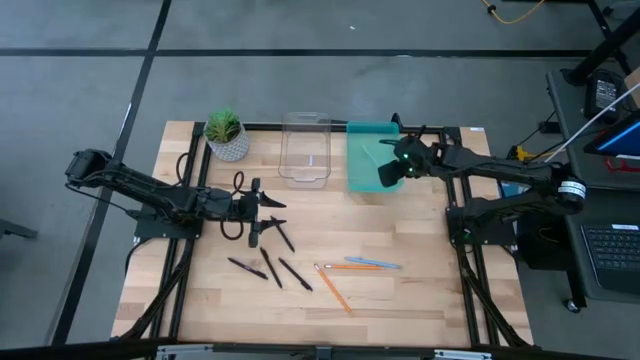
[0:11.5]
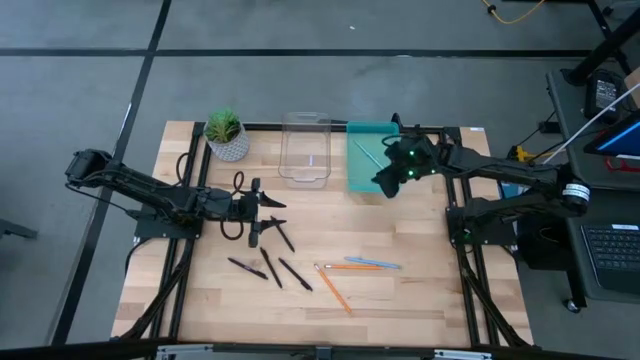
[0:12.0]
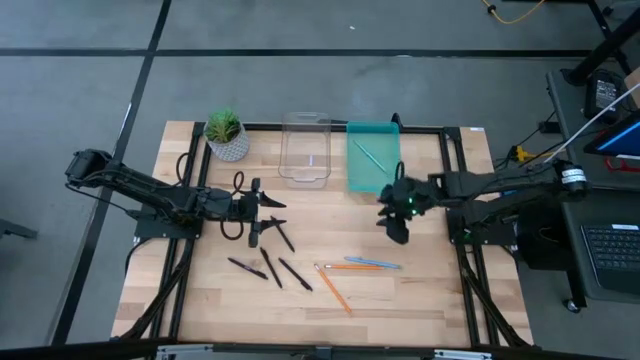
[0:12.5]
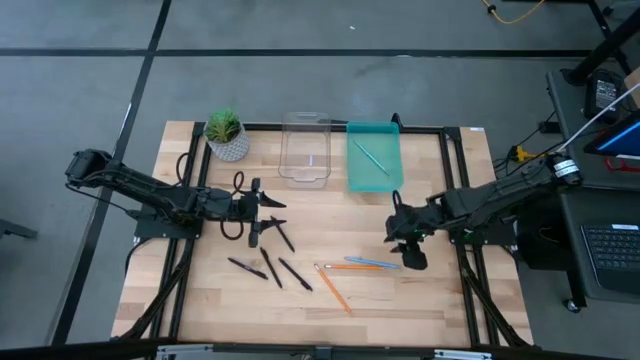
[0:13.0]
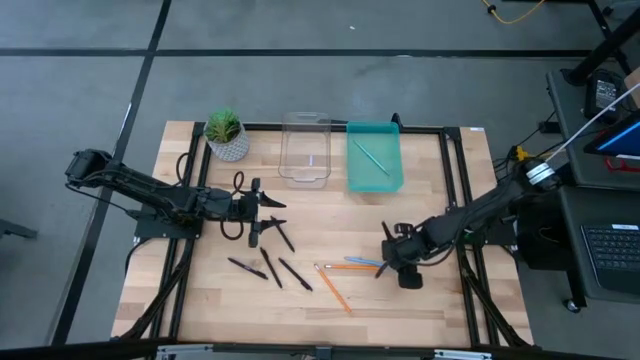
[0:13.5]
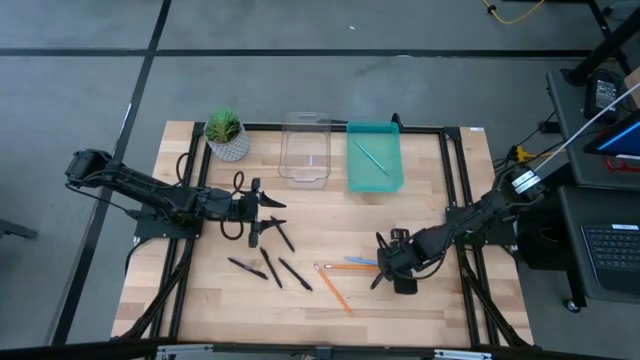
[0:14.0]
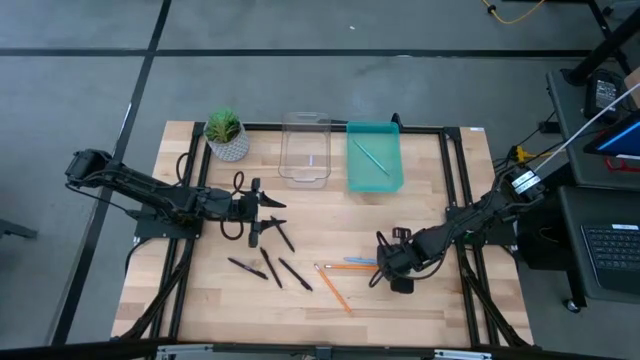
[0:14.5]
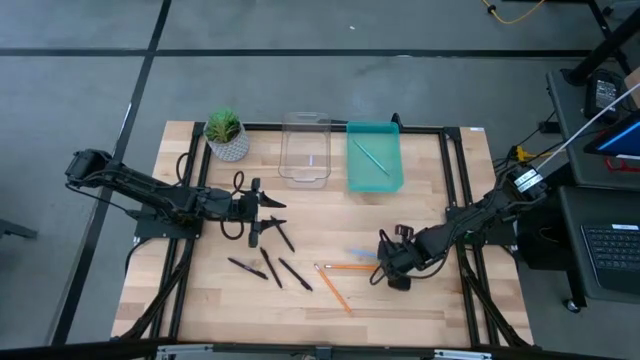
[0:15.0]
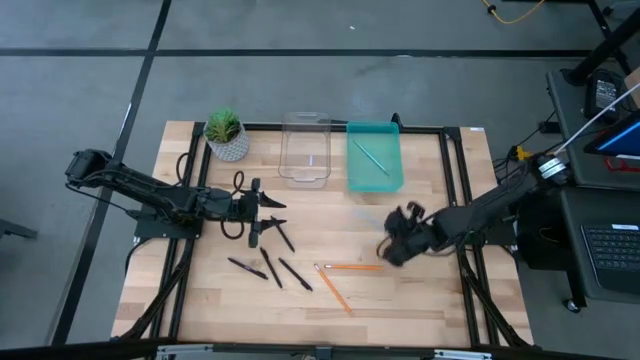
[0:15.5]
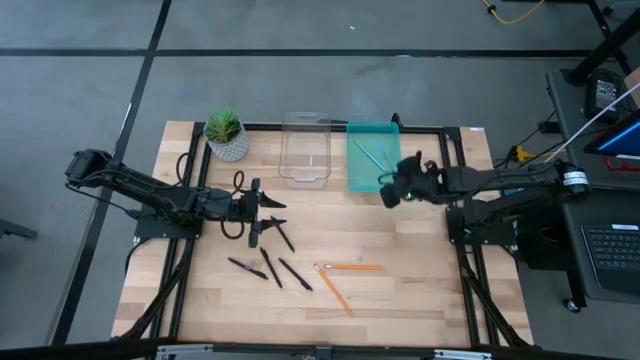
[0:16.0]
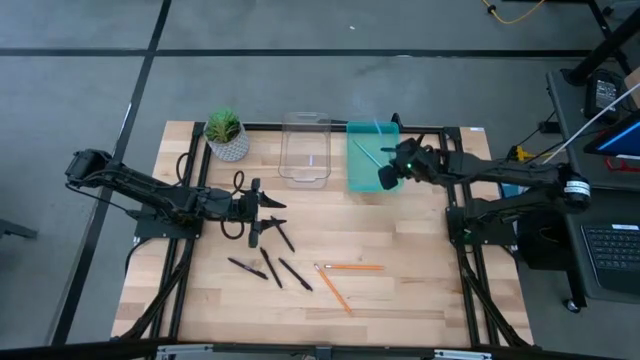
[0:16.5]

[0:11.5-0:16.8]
Task: Sort pens & pencils
Put the blue pencil into the blue bin

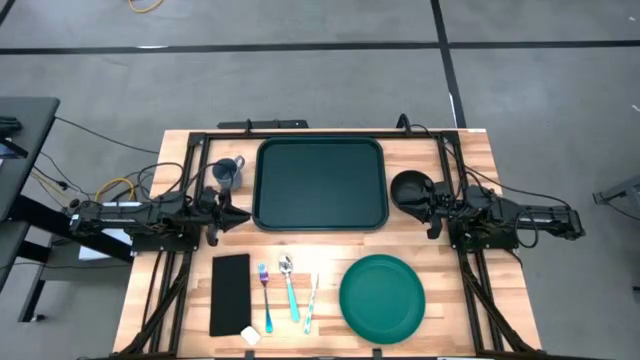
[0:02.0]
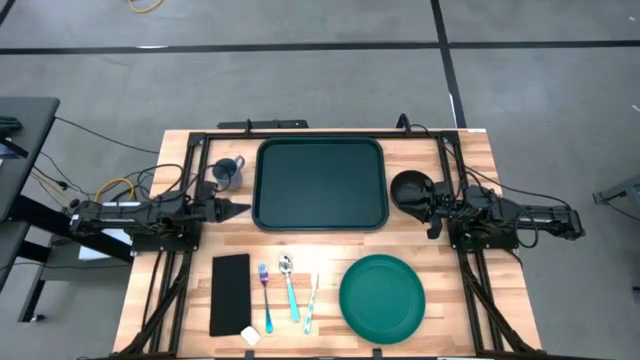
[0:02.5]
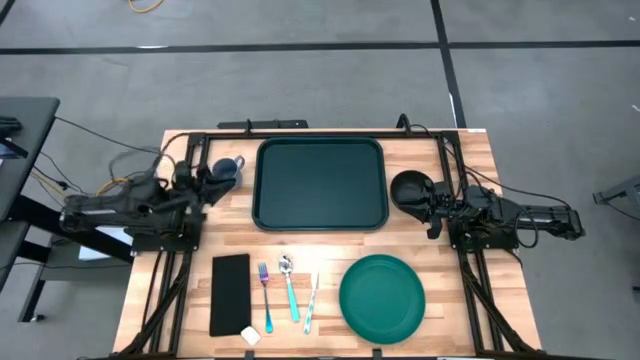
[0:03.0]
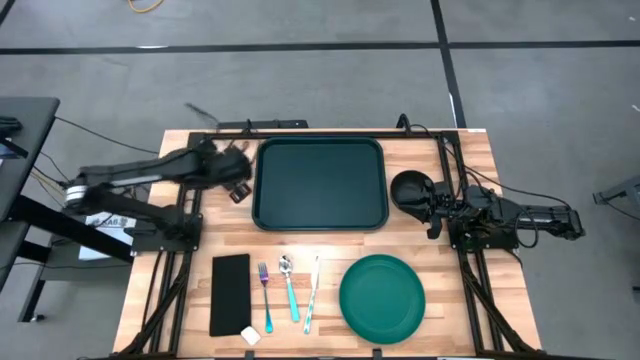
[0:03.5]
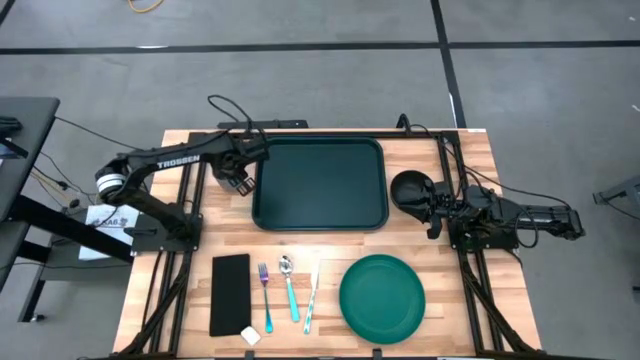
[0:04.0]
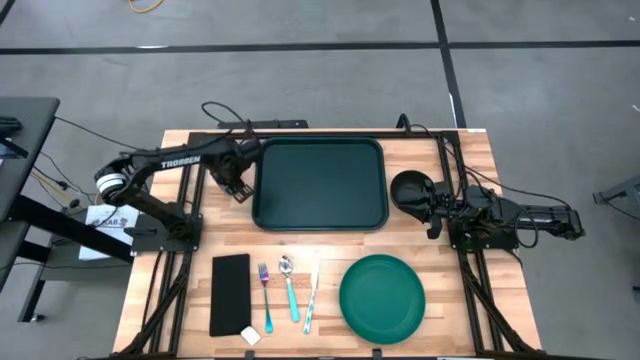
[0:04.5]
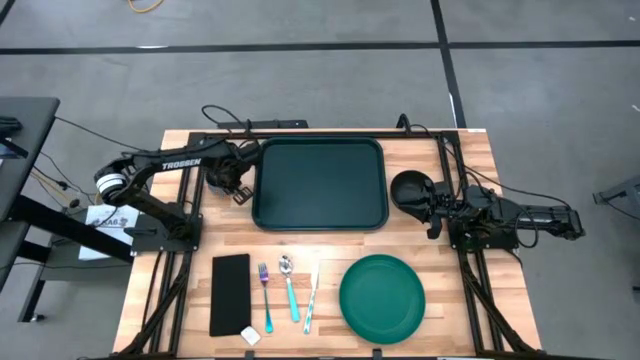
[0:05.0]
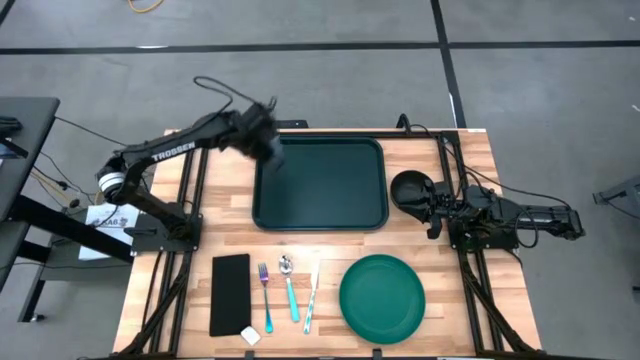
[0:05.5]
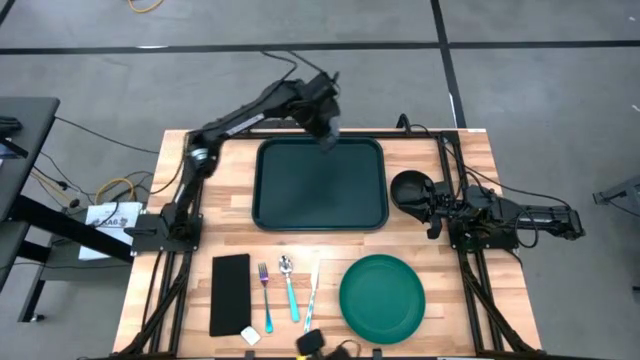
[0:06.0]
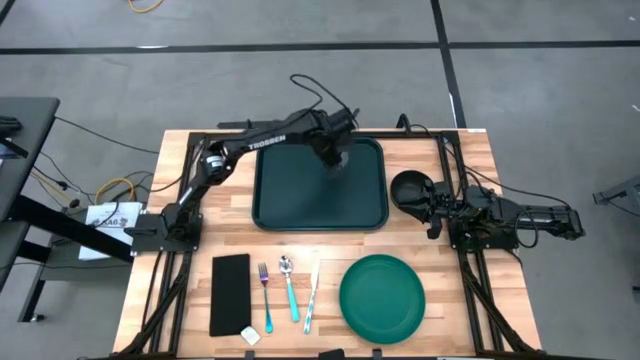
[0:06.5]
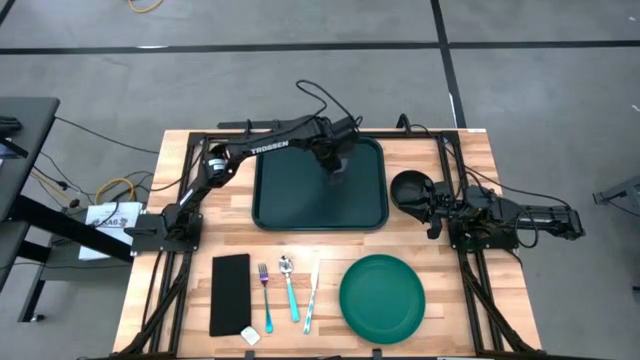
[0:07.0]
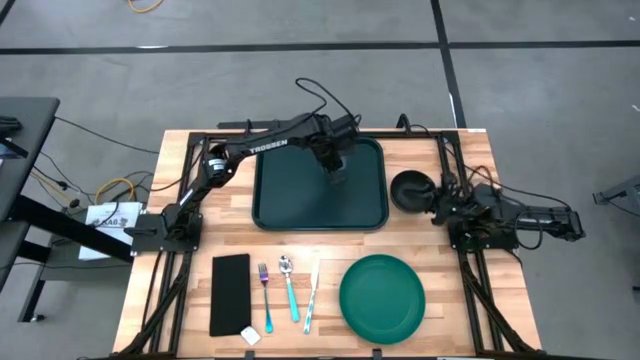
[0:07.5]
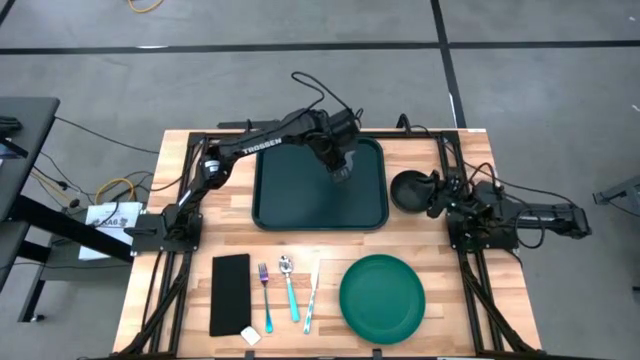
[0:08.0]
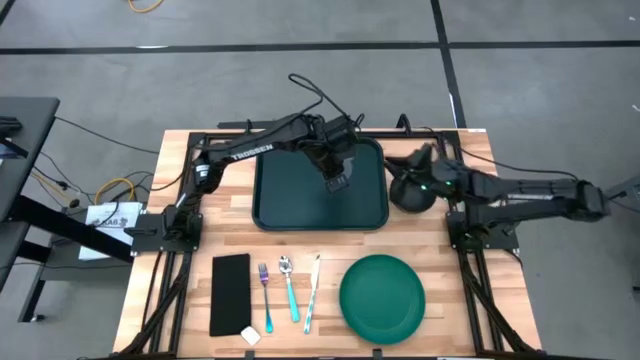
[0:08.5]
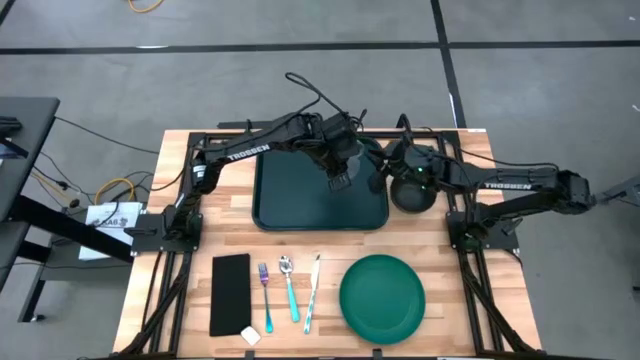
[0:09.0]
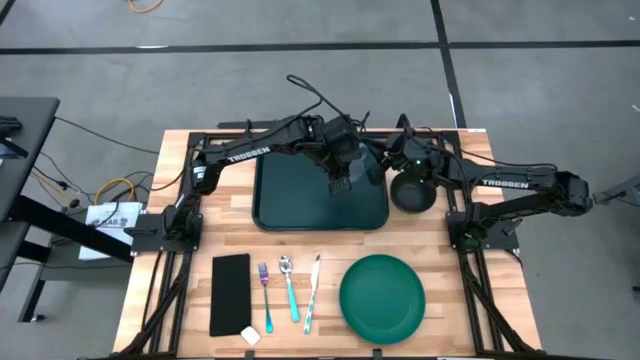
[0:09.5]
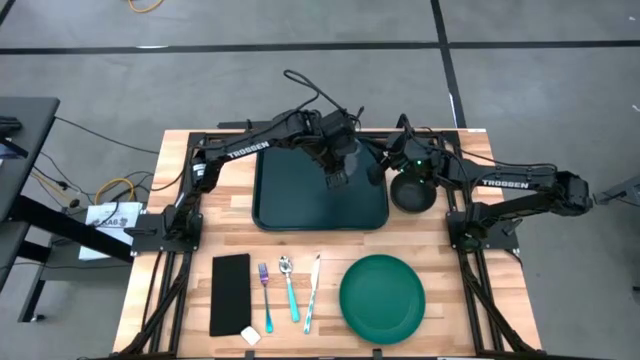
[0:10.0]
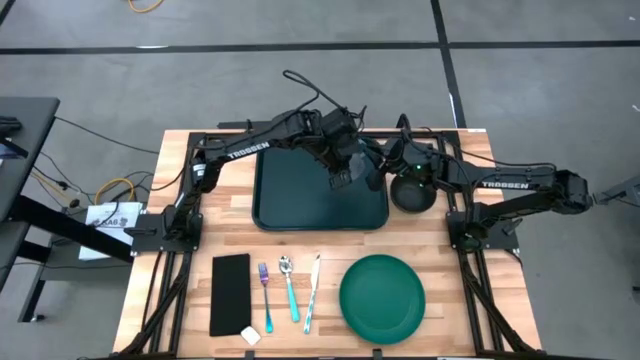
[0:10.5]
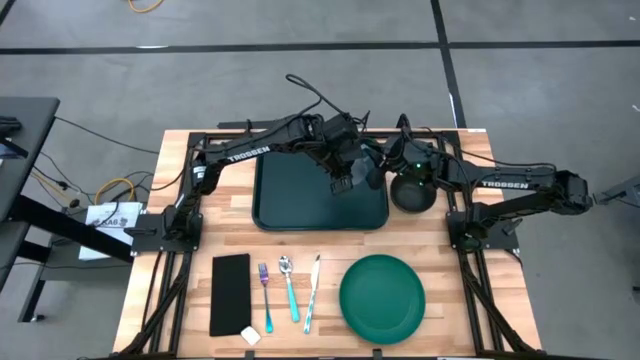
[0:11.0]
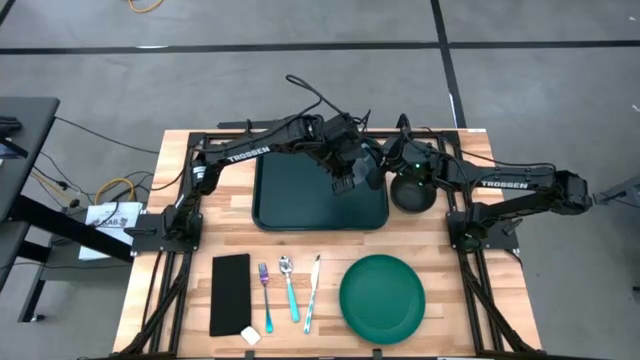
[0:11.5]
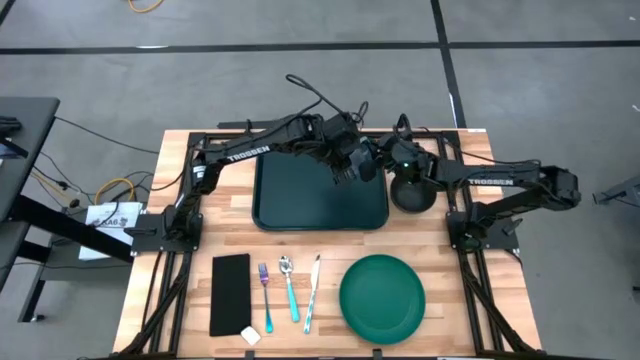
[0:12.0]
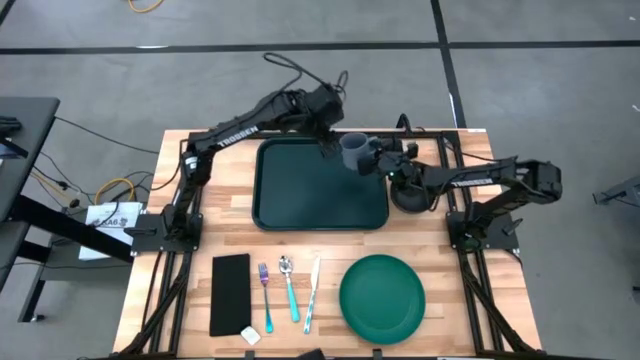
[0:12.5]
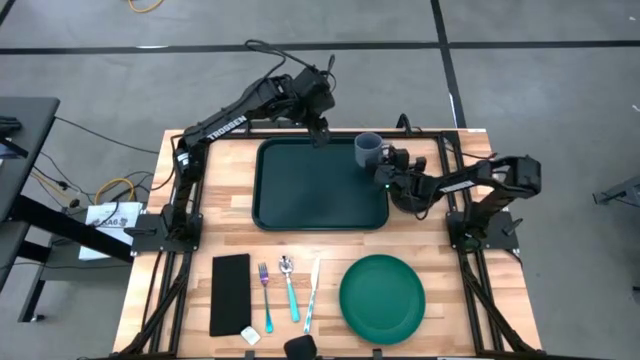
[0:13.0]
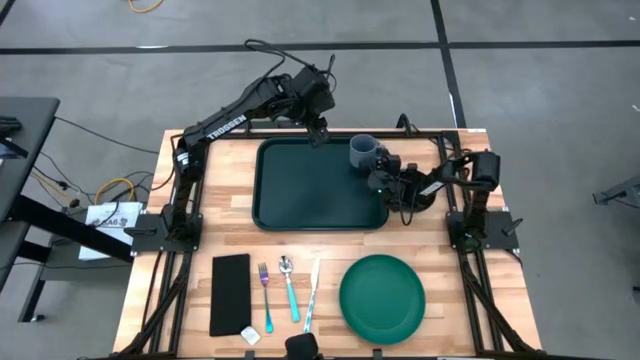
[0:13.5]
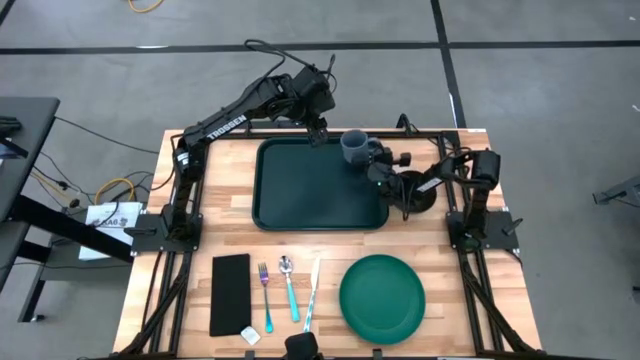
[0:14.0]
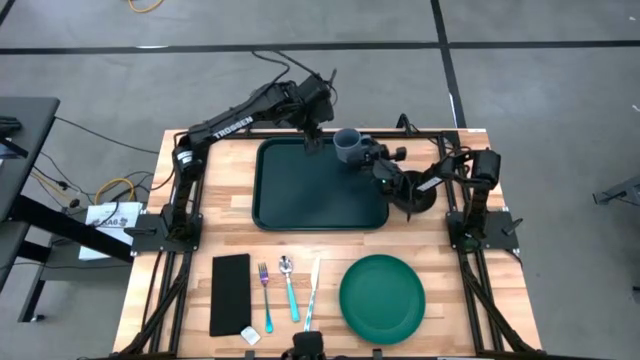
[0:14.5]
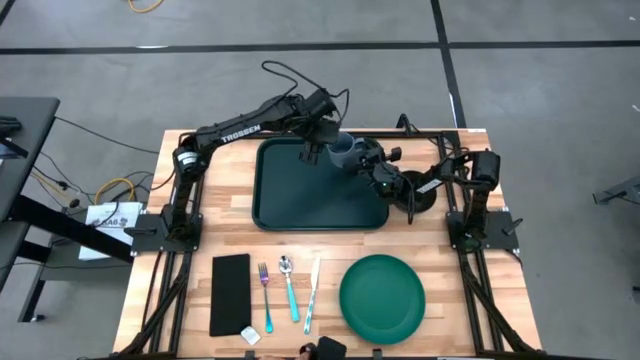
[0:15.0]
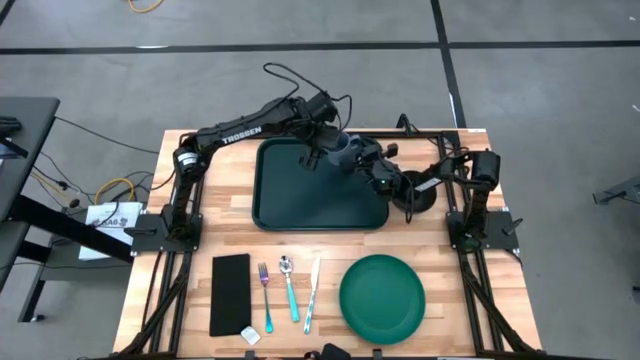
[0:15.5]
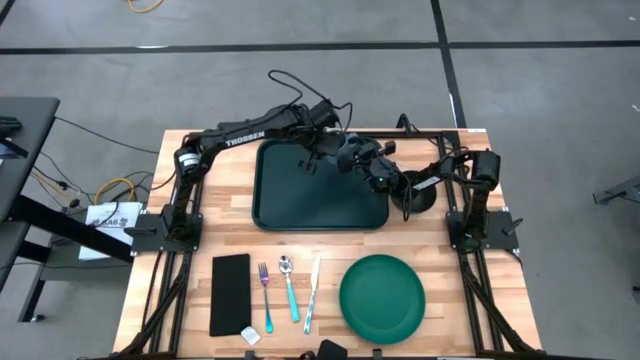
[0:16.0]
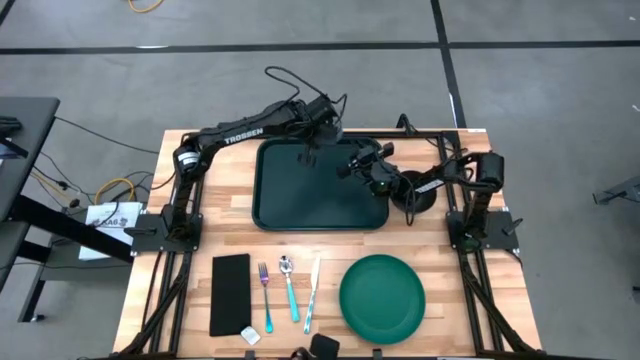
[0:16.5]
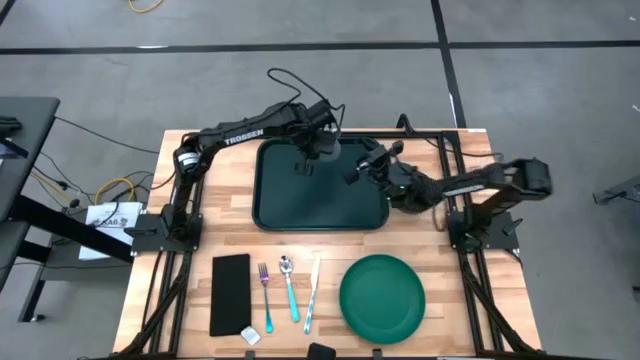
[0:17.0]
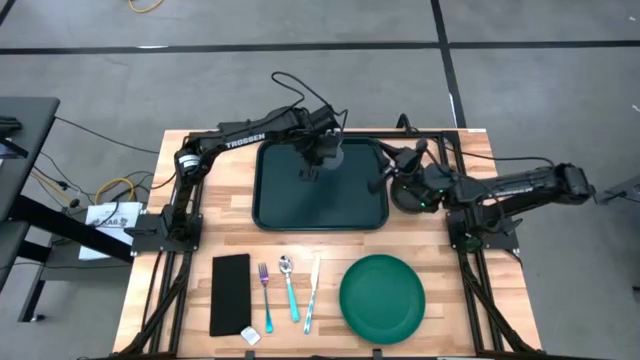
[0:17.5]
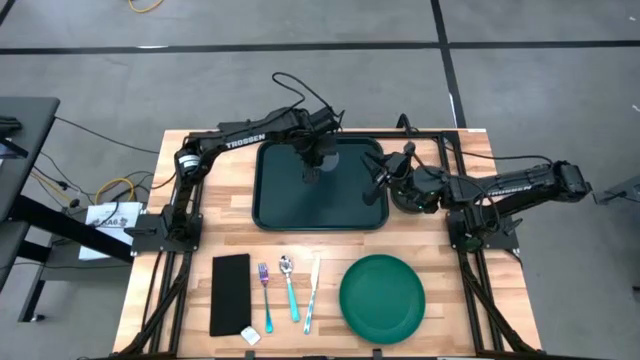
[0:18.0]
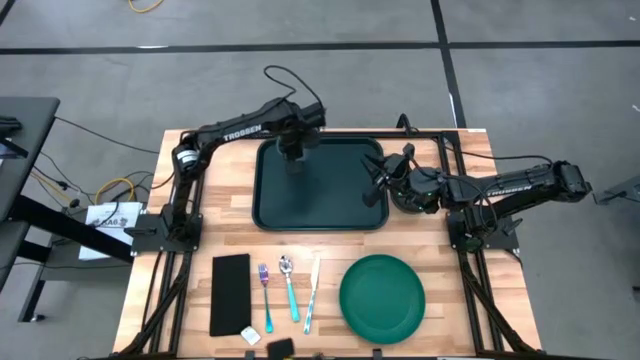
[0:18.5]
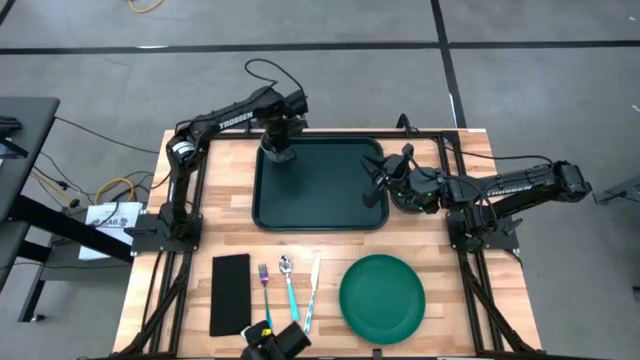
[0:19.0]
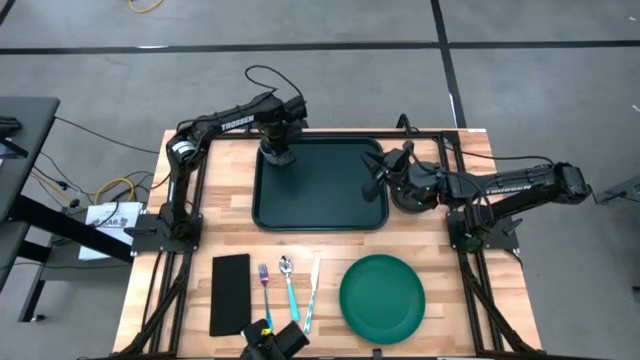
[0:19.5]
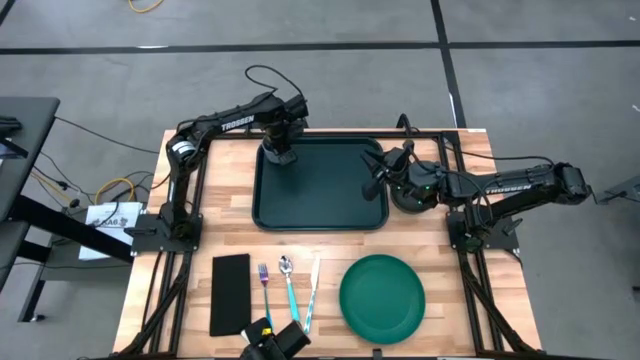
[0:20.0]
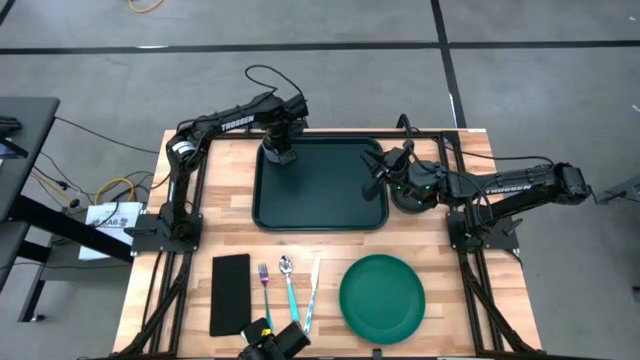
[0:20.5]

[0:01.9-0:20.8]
Task: Set up tray
Put the light blue mug on the top left of the dark green tray
